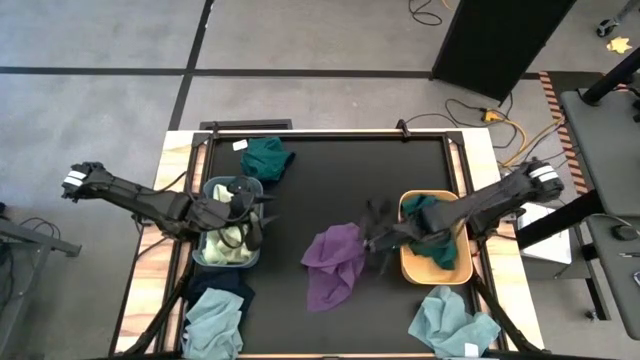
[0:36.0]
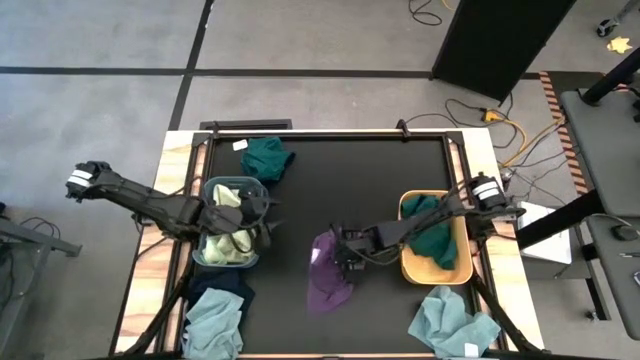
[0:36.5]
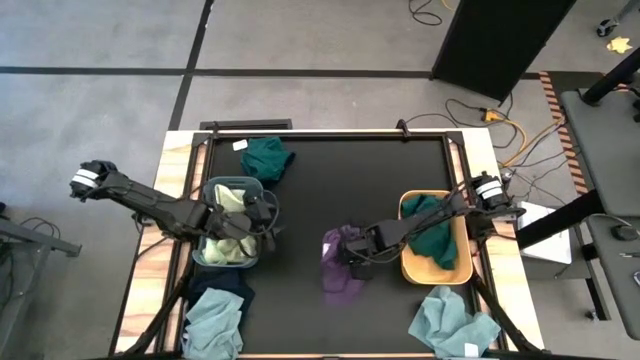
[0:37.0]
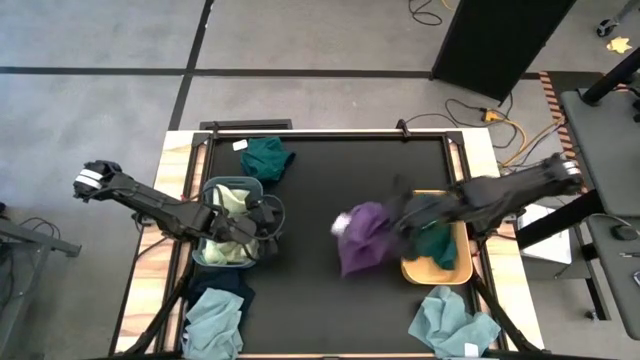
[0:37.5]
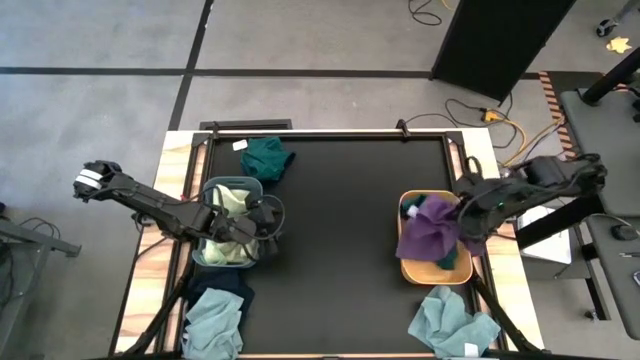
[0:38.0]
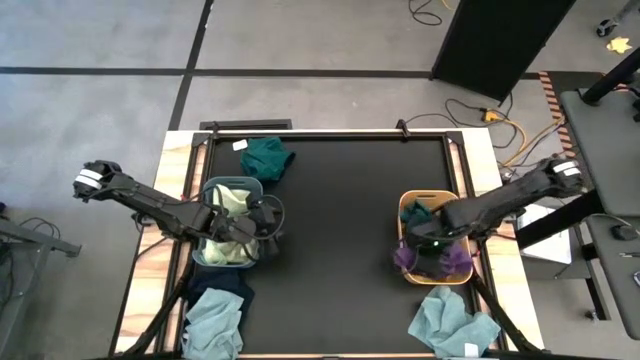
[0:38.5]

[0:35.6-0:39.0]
Task: Sort microfiber towel by color & place in baskets
Put the violet towel into the yellow bin

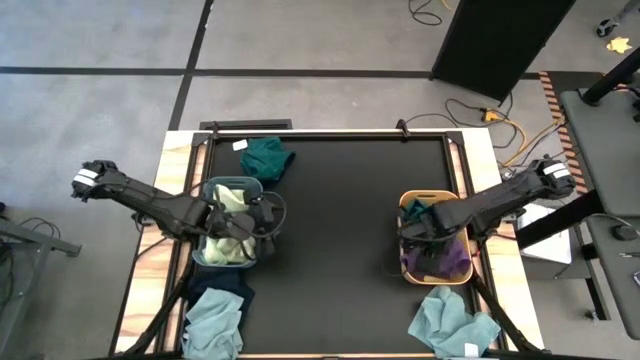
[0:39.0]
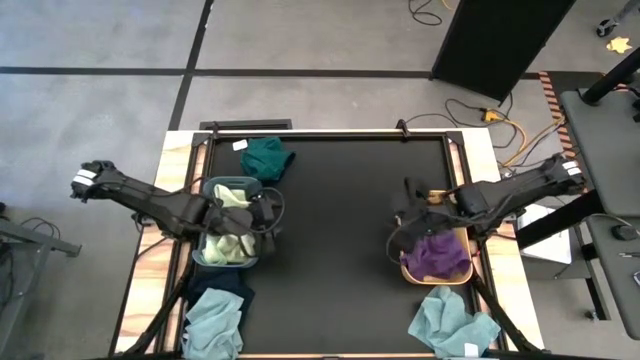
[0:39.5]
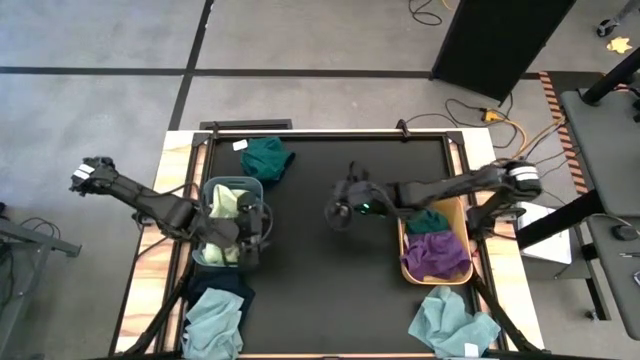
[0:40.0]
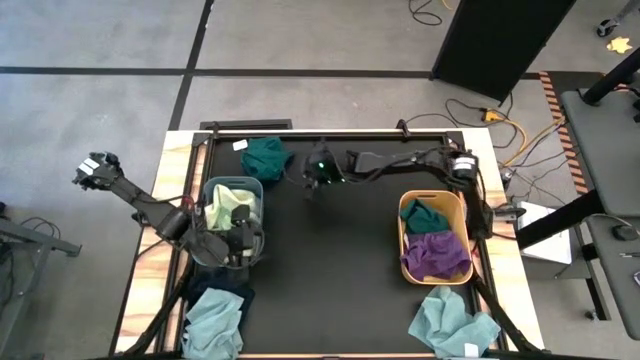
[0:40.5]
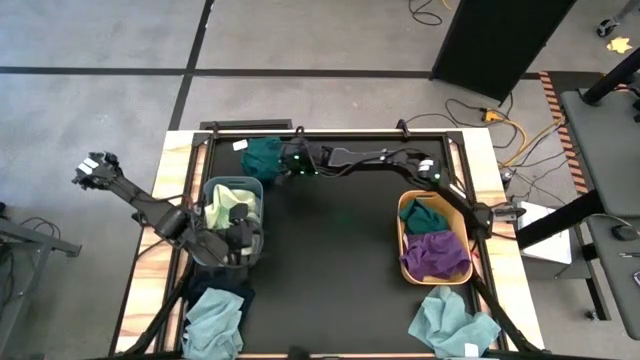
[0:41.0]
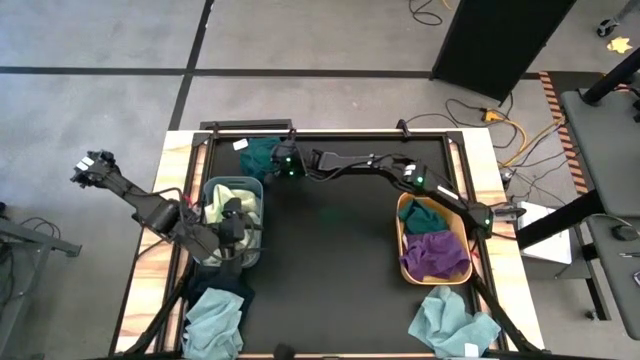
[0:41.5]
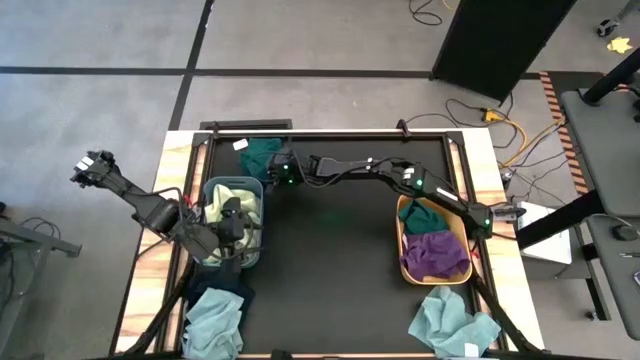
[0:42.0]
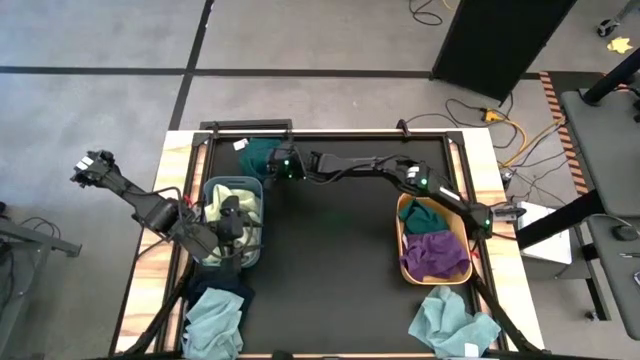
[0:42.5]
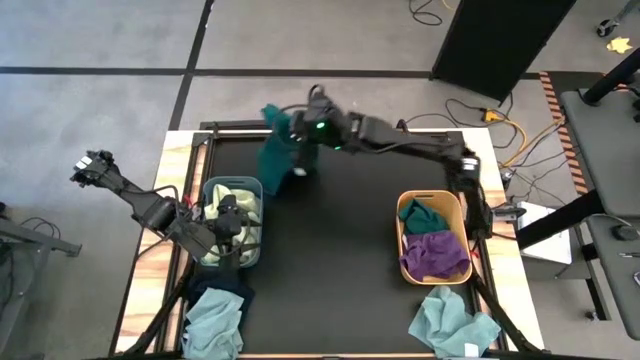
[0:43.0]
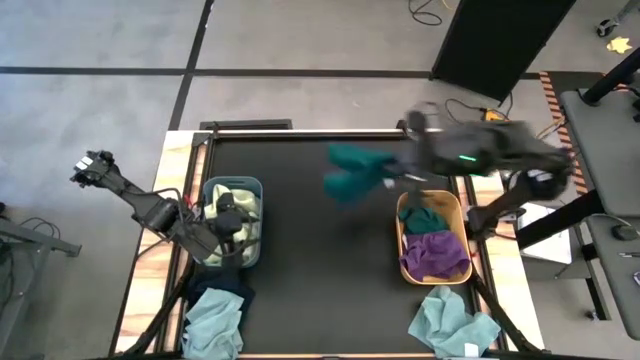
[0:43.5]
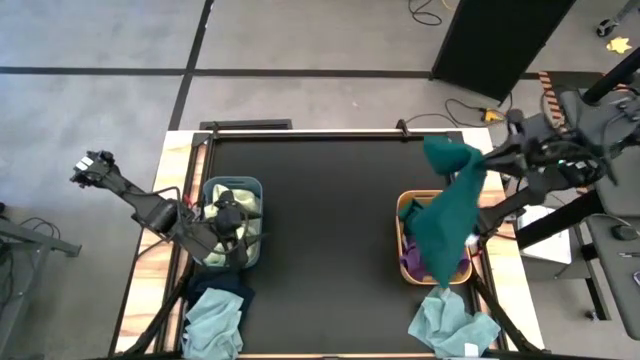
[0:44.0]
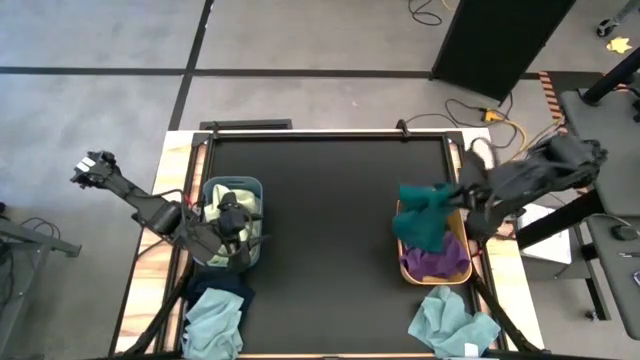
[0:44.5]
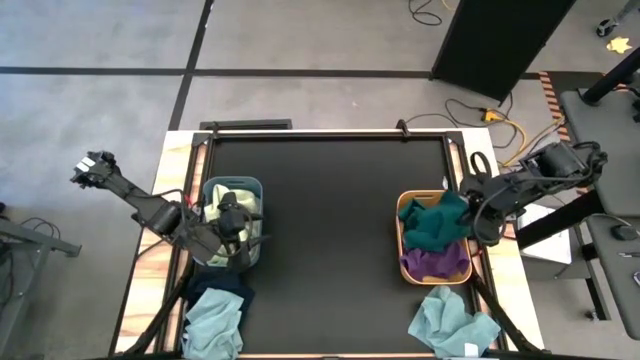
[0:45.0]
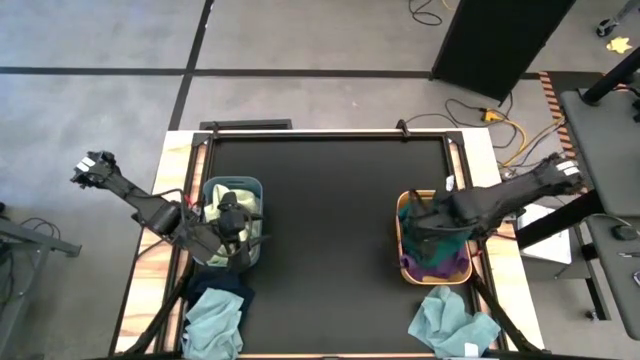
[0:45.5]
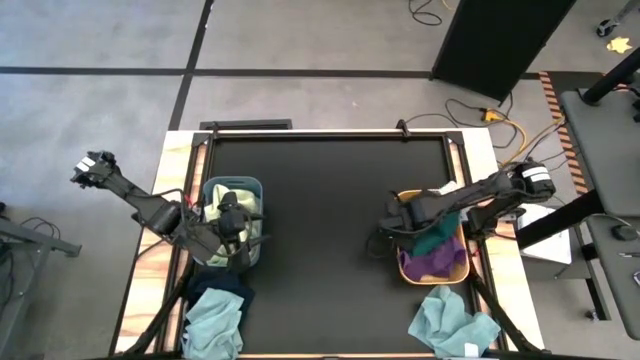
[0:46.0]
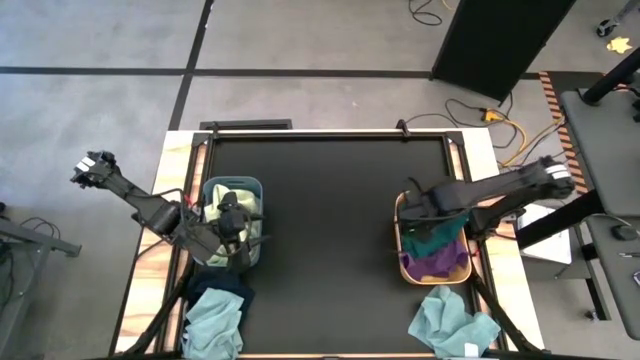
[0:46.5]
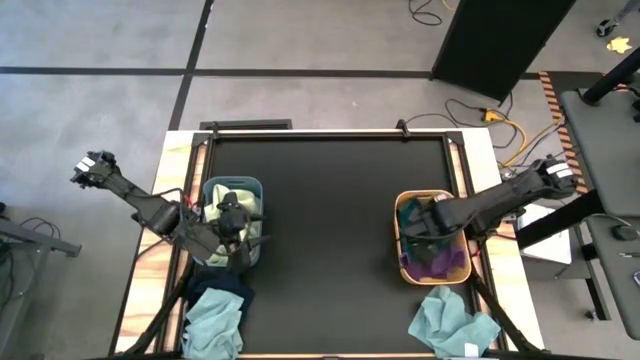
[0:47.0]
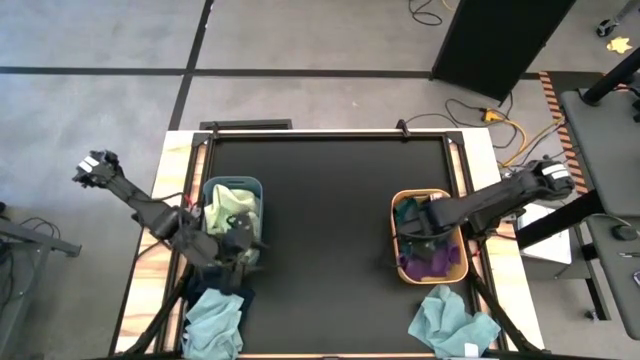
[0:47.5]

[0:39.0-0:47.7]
Put the green towel into the yellow bin

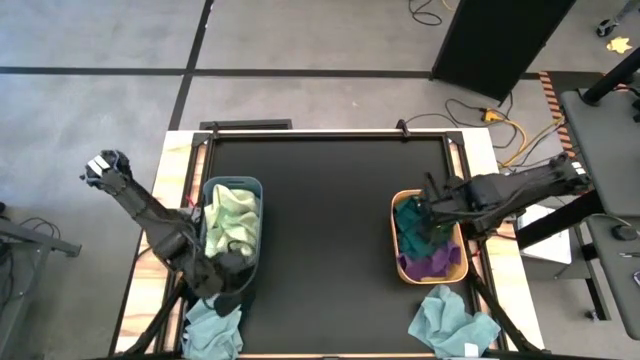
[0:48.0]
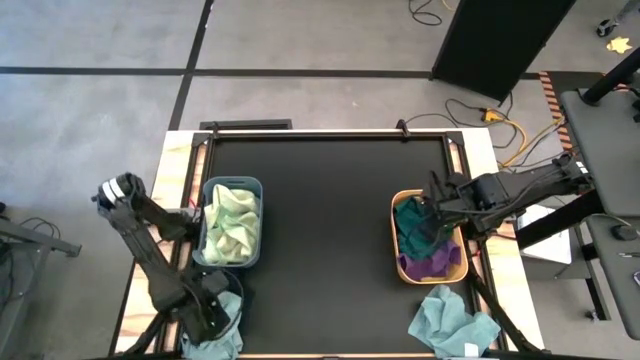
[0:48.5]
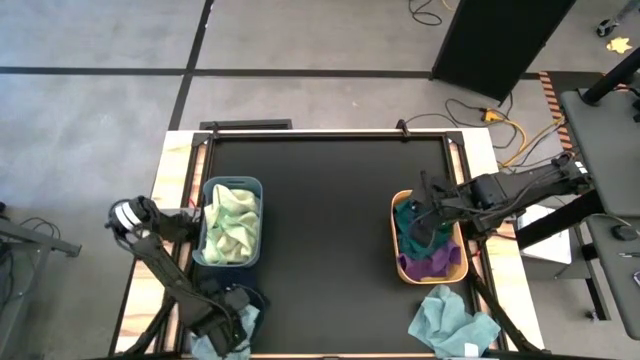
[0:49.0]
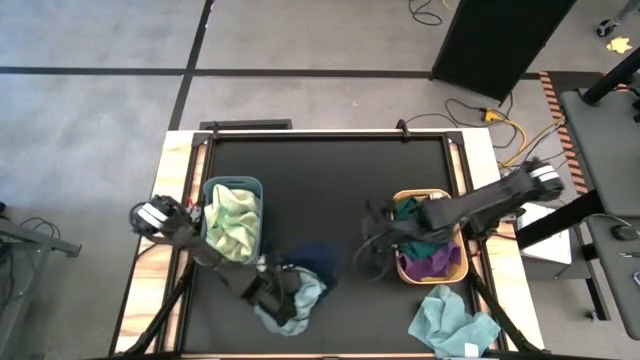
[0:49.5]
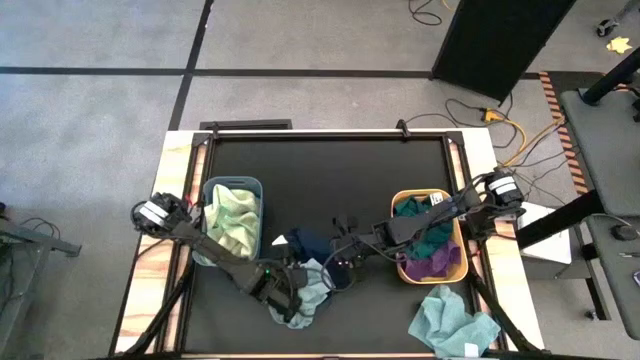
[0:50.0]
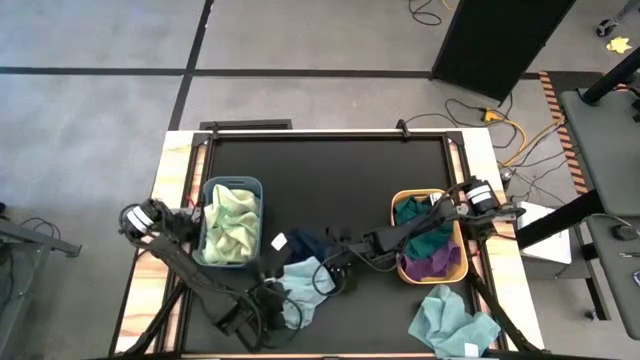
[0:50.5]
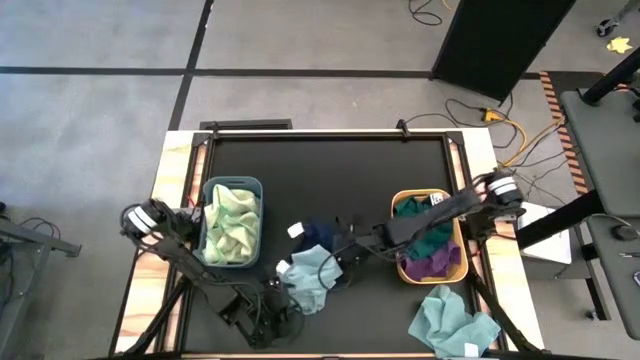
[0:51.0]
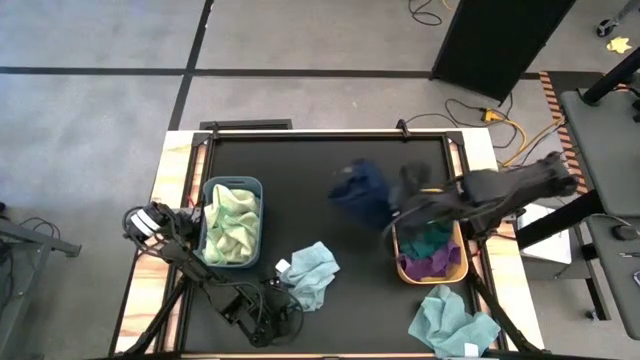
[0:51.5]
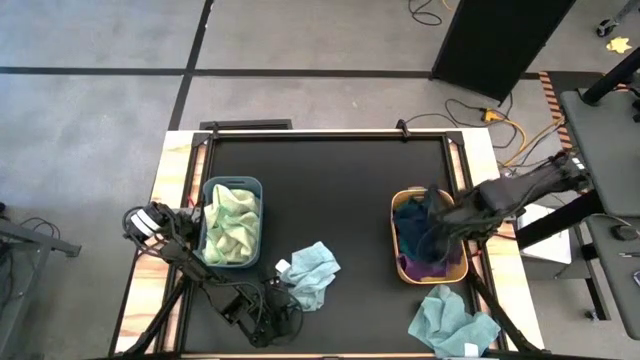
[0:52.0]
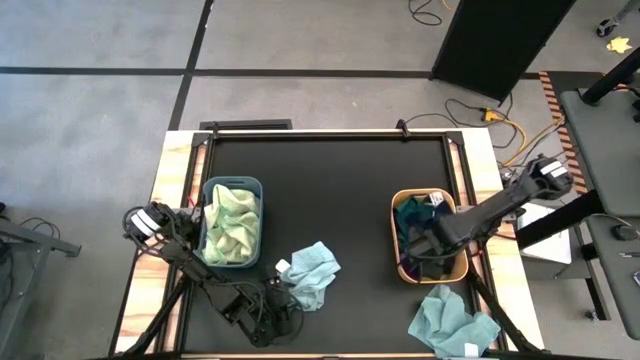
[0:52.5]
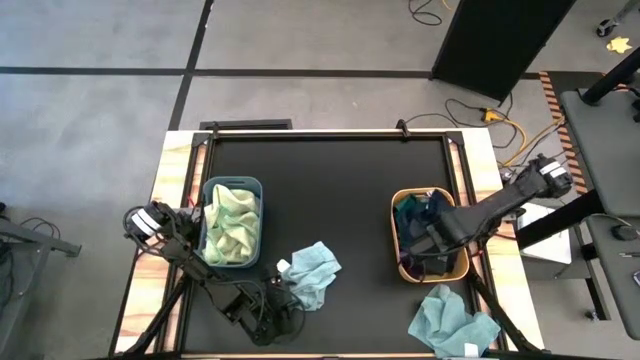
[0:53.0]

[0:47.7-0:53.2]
Put the blue towel into the yellow bin

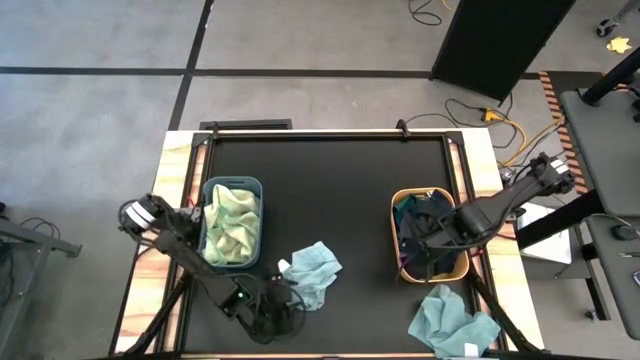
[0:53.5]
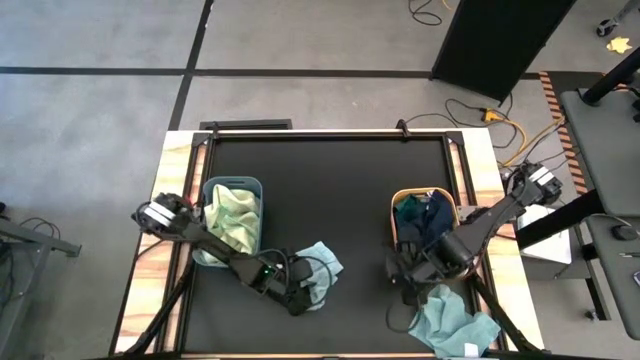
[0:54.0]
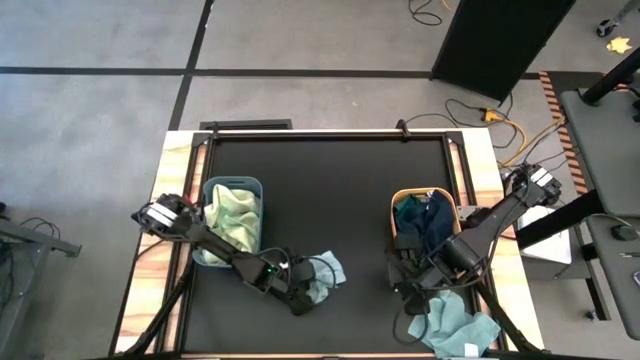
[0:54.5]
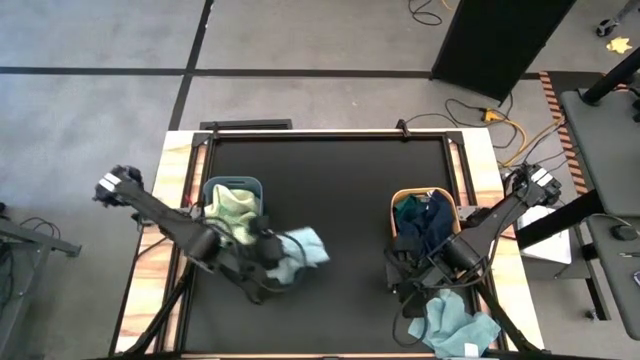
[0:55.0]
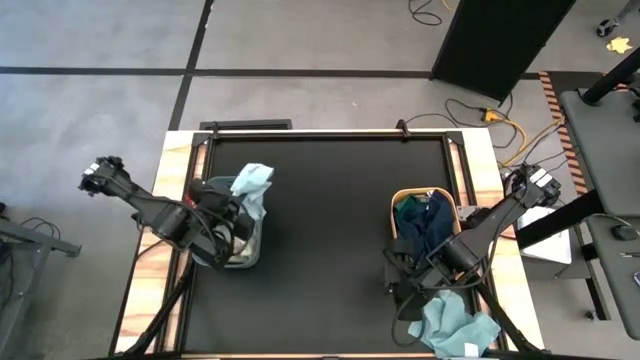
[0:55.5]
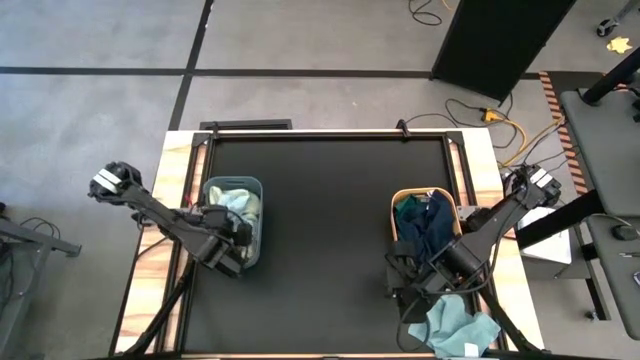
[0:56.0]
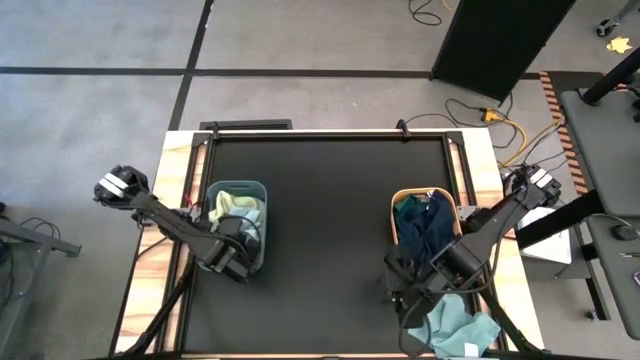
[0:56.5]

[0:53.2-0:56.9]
Put the left light blue towel into the blue green bin
